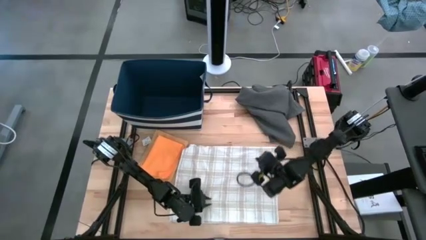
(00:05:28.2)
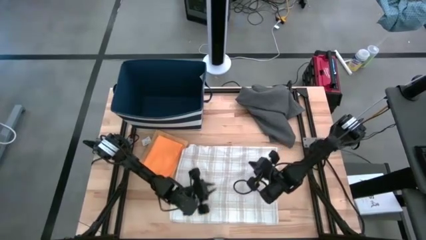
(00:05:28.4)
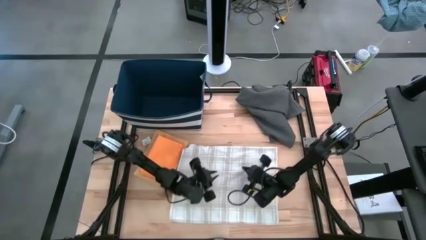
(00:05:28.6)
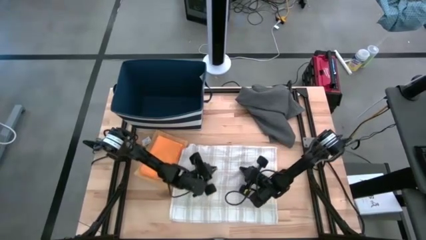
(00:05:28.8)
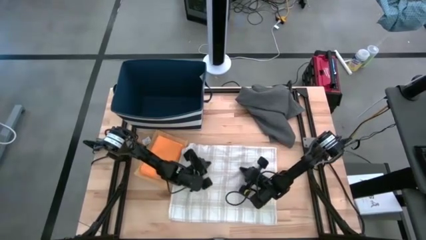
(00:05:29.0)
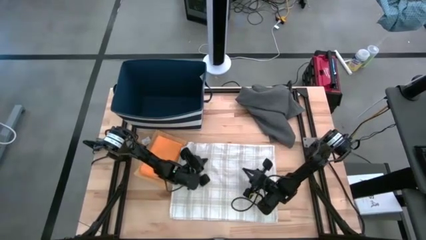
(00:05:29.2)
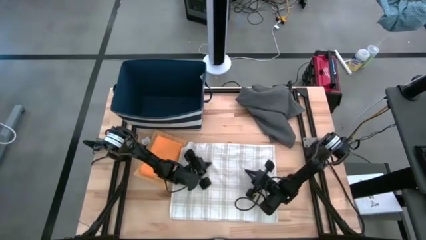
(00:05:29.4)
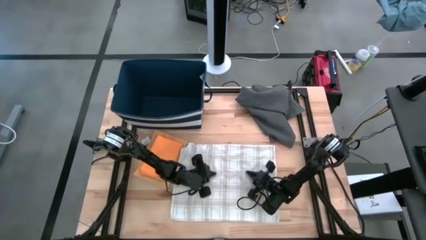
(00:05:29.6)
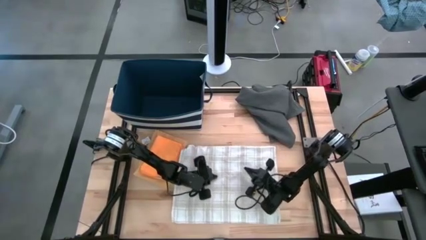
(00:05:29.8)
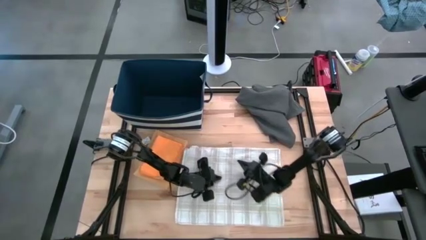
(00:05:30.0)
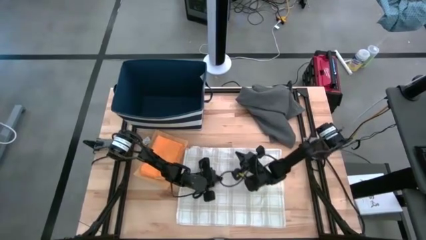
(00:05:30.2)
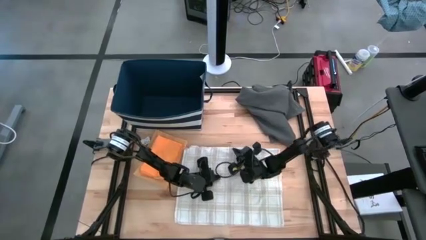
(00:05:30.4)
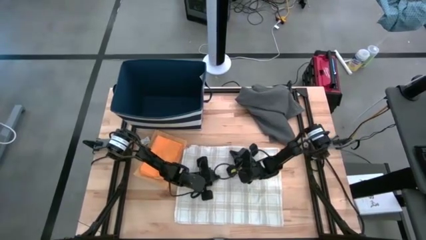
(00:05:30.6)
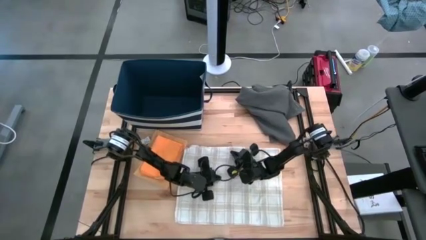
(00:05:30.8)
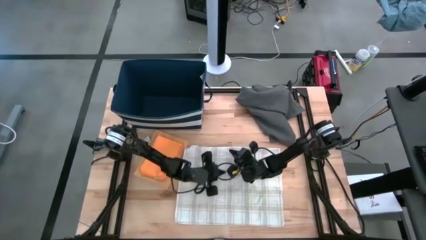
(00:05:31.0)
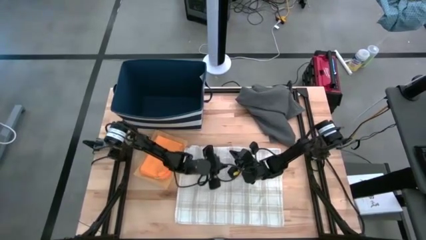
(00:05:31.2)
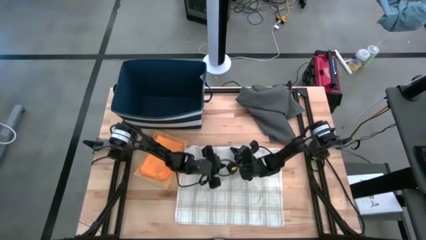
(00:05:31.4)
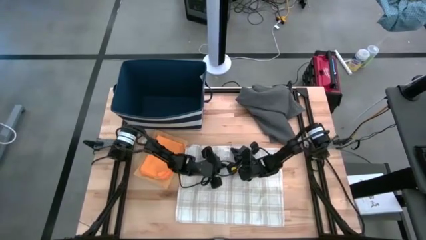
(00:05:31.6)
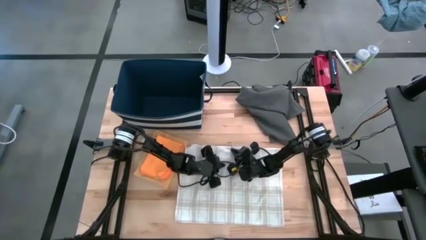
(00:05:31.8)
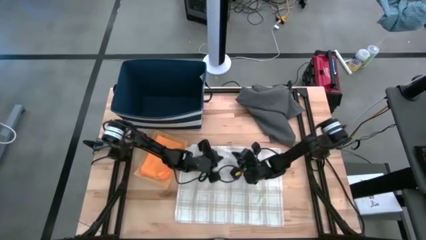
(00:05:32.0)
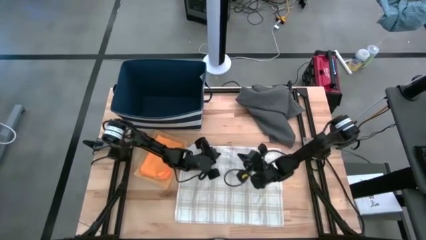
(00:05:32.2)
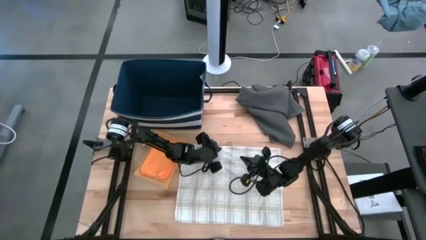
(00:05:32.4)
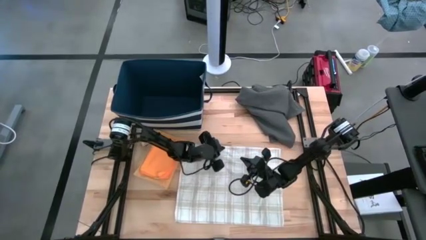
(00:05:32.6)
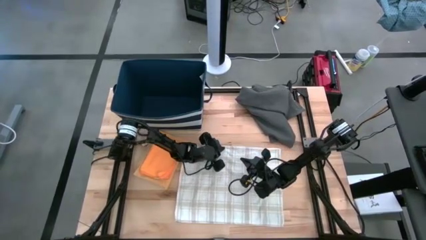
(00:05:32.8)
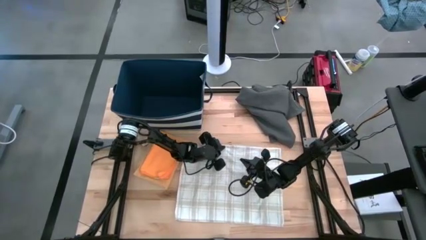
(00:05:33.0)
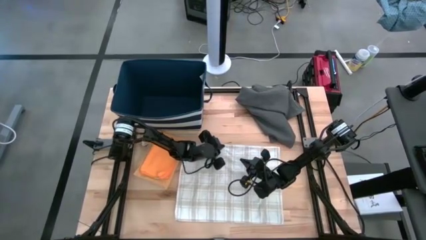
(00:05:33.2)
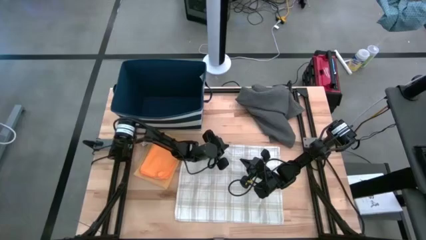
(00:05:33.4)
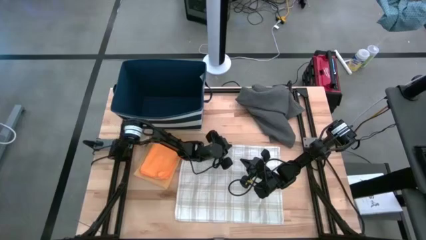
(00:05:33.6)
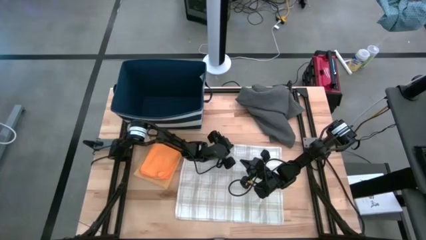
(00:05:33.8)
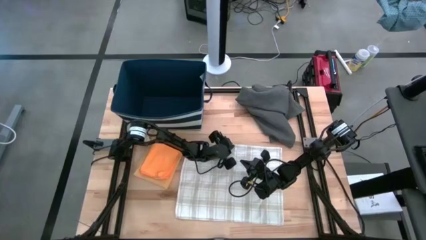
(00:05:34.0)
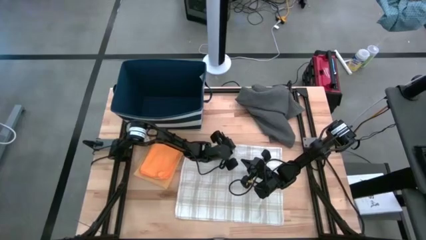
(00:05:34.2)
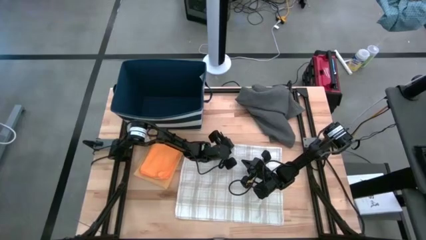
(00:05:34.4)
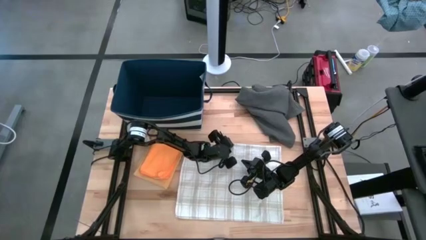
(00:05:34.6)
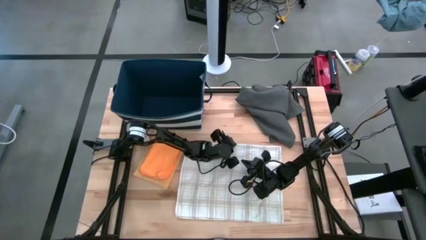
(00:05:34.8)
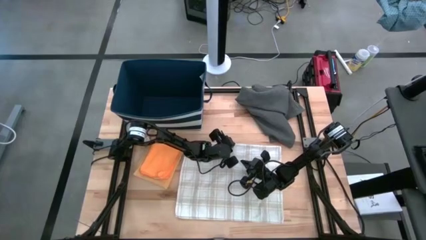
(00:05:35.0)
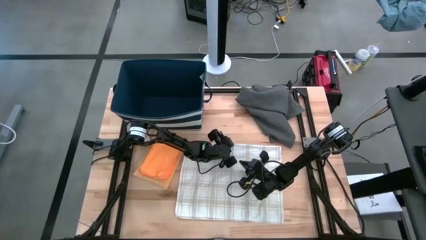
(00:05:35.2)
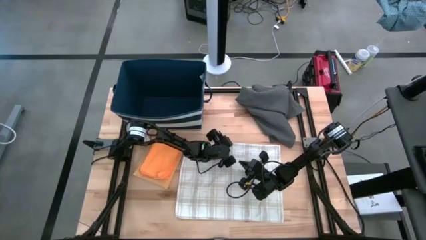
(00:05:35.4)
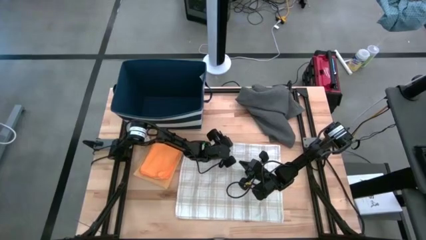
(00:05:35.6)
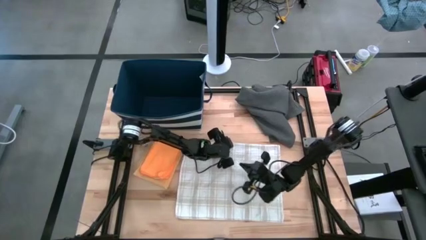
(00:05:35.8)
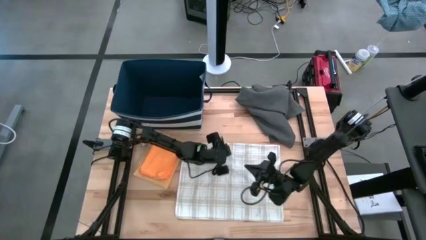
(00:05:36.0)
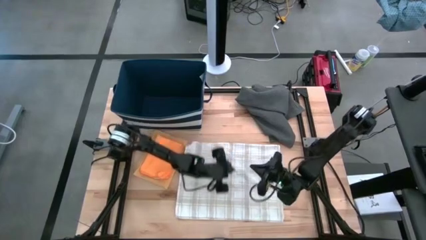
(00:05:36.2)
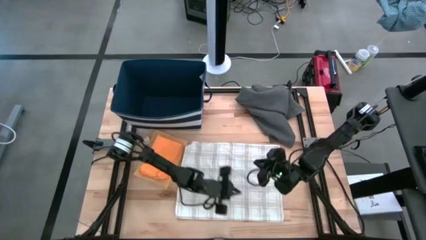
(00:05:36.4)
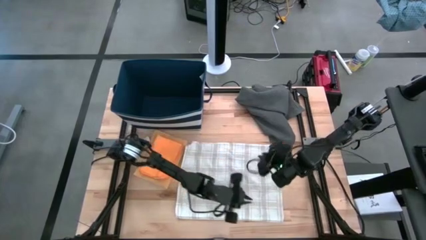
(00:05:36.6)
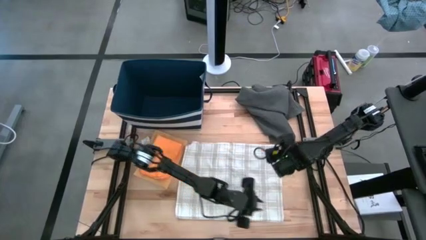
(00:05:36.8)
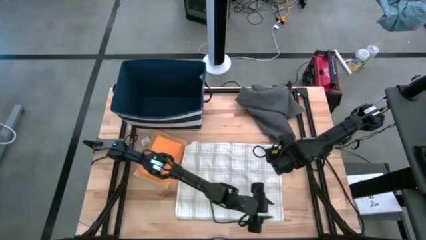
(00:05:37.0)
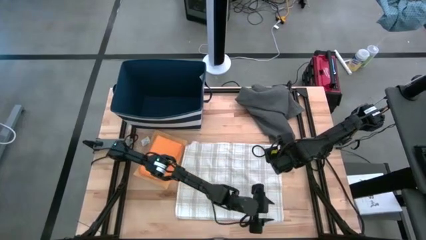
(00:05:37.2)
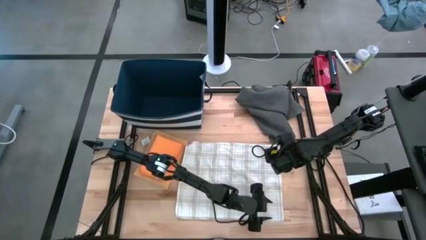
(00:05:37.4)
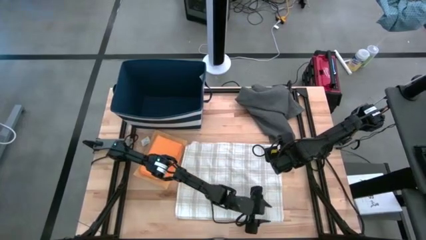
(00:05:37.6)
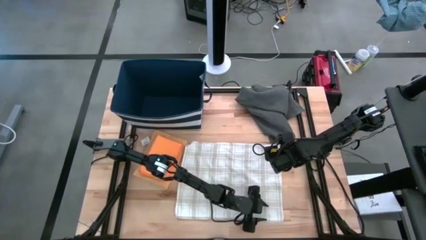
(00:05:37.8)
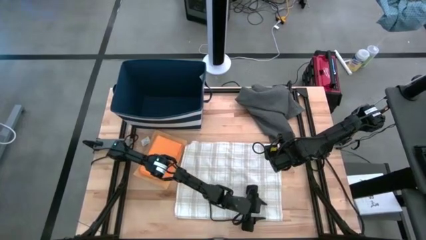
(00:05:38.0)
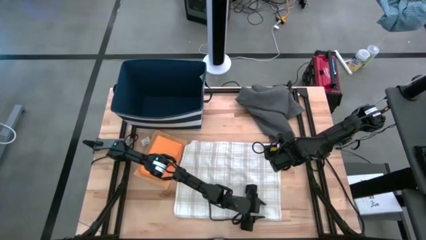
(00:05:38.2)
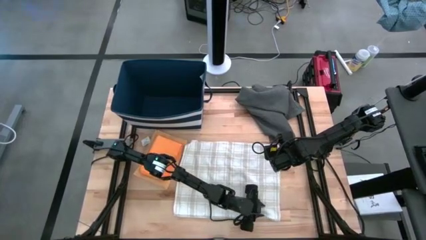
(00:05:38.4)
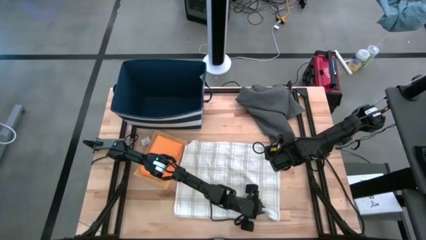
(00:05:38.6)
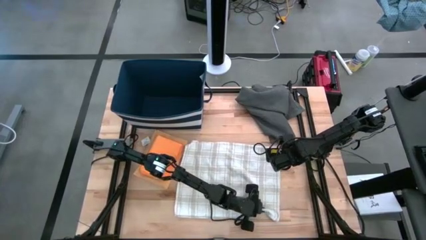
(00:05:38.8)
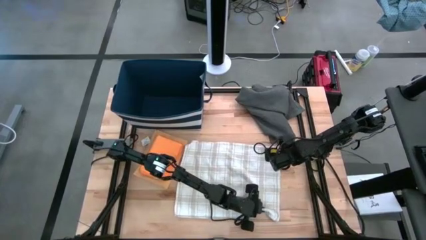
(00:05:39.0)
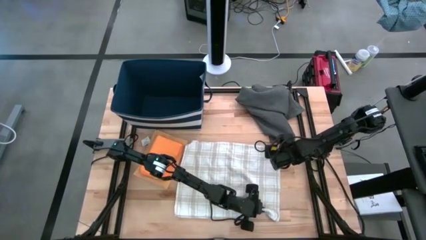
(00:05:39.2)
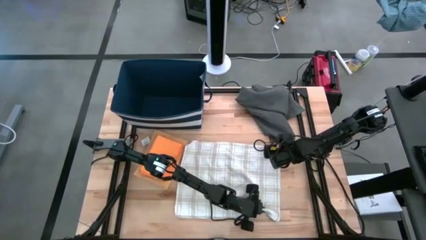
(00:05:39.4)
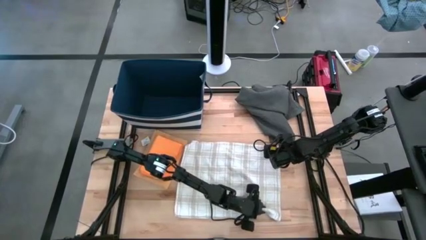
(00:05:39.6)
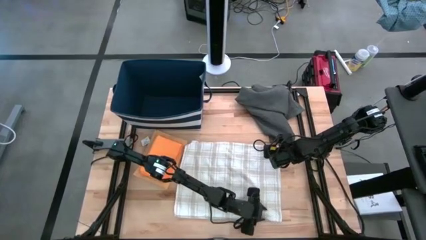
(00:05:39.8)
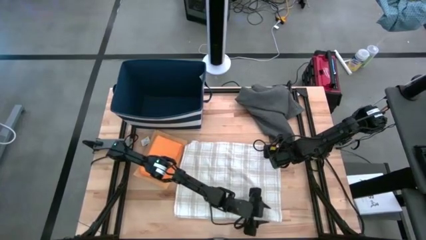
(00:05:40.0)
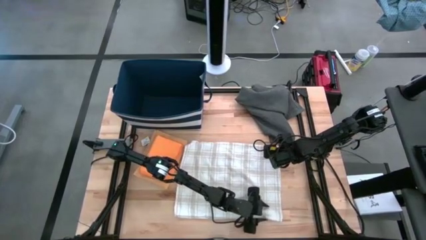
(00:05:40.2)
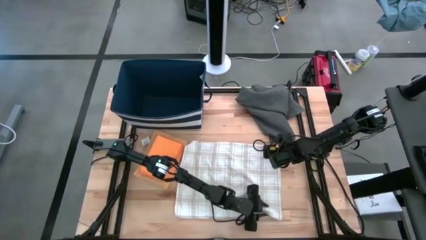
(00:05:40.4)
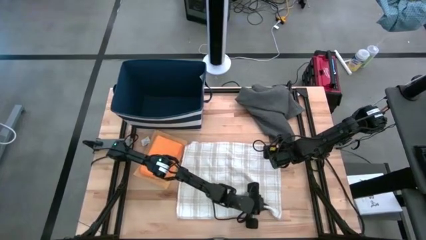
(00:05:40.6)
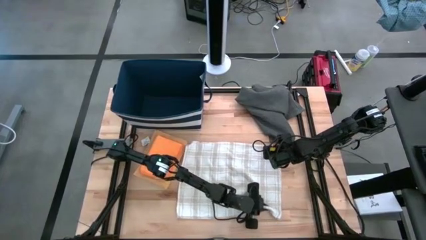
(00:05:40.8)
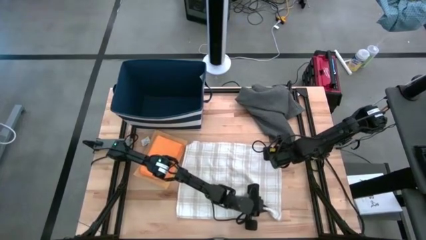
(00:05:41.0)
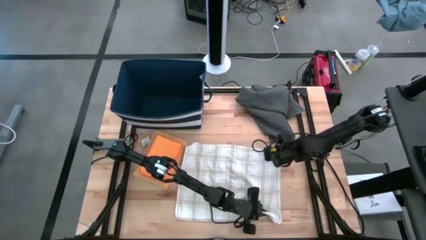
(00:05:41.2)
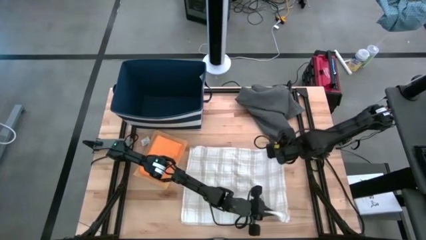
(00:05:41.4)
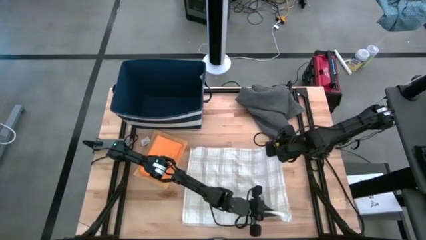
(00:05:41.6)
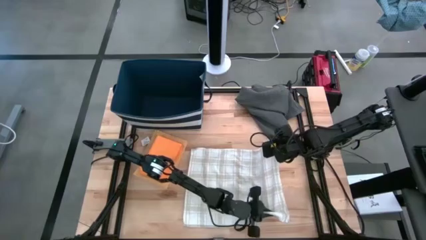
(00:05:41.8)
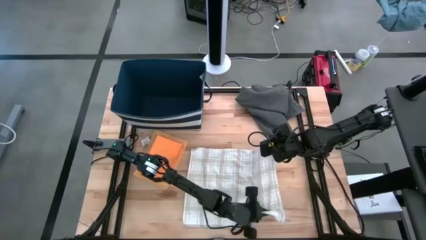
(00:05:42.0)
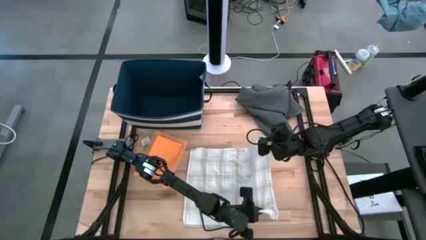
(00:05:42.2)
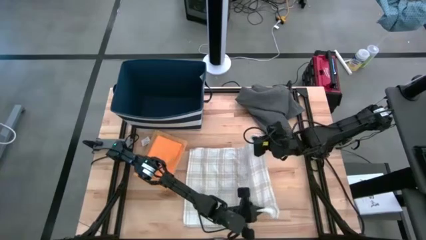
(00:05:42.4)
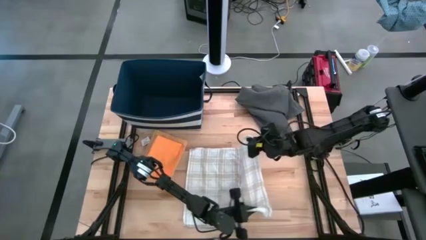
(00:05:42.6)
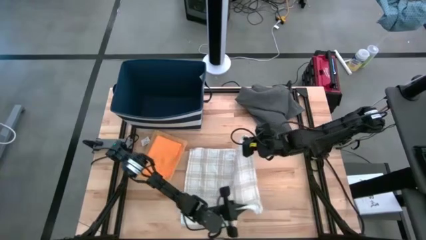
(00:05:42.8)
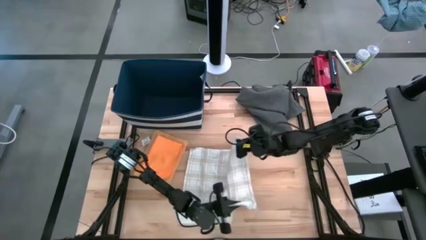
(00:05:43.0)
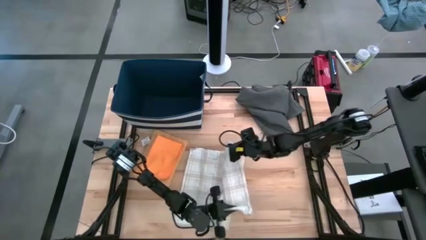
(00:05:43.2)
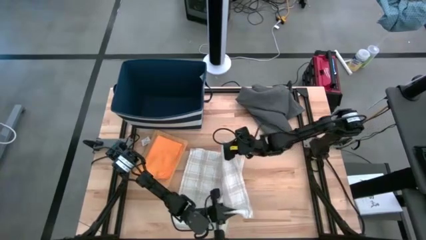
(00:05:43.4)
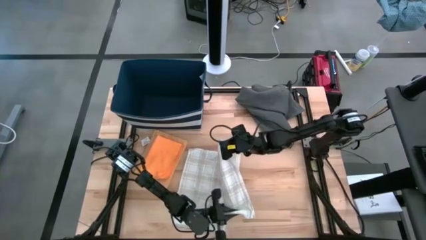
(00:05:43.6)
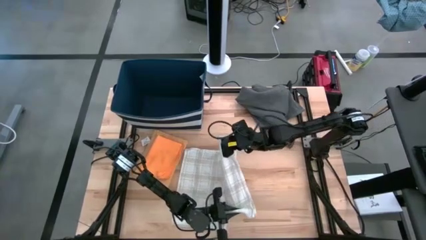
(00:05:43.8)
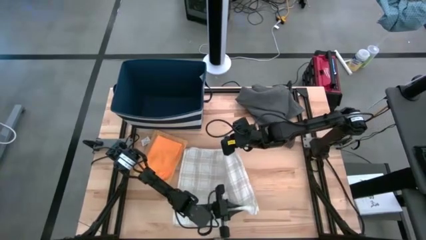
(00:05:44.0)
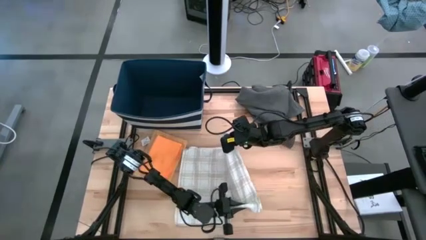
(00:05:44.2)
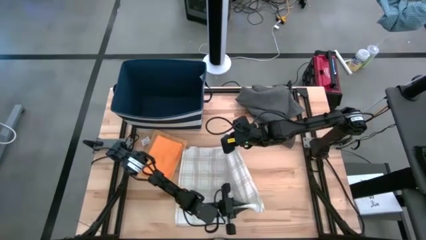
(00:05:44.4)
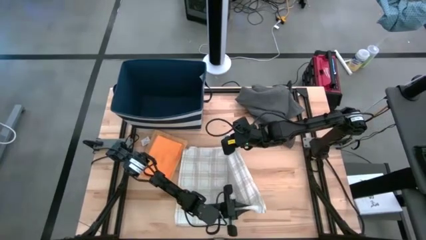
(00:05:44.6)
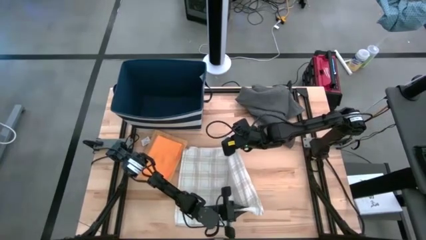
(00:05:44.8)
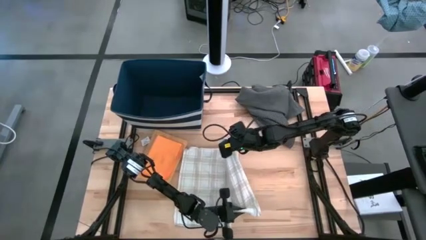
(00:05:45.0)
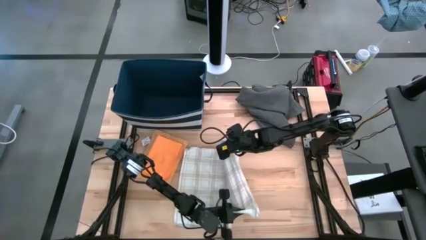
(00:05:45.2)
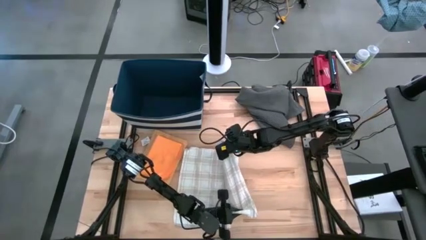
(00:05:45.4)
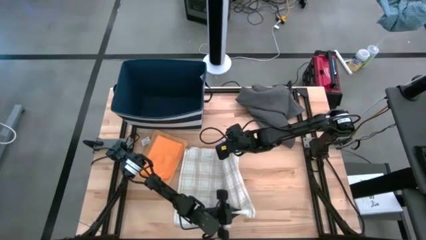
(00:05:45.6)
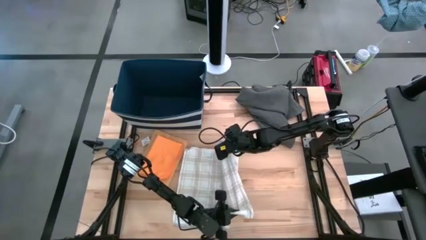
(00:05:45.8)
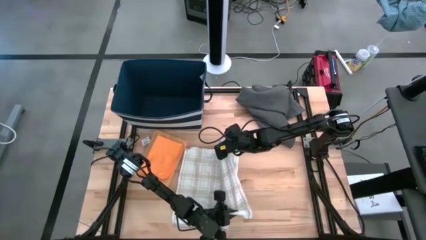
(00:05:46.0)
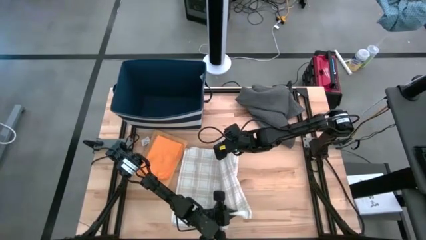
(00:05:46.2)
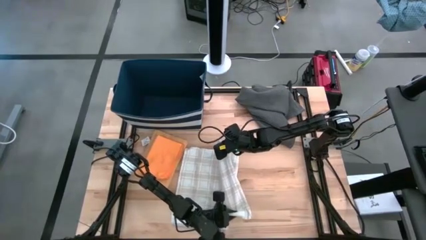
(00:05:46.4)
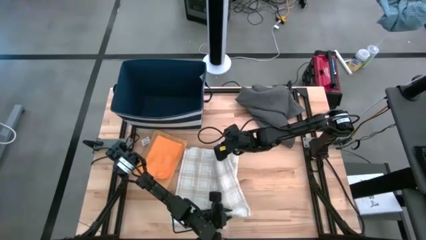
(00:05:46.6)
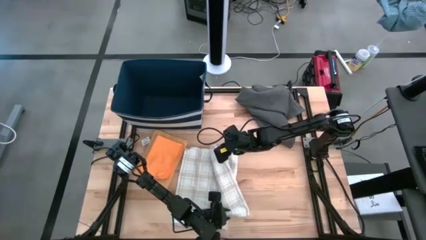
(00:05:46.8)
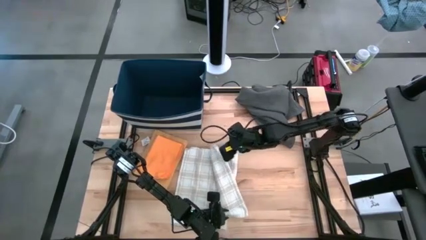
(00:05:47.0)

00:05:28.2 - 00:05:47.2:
Task: Fold towel
Fold the white patterned kitchen towel
